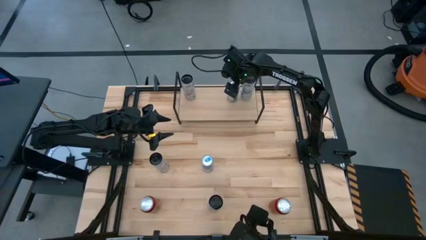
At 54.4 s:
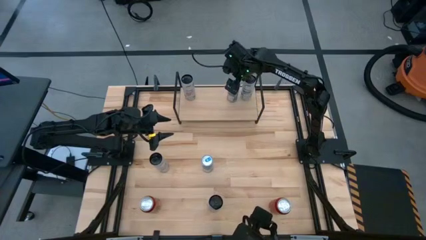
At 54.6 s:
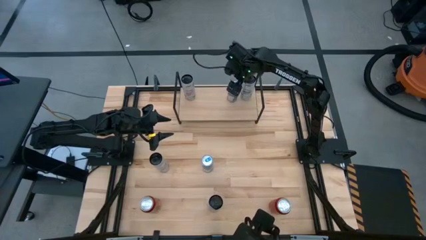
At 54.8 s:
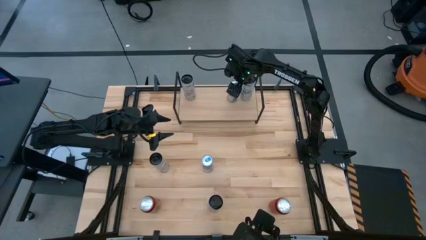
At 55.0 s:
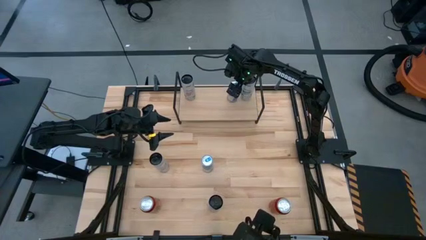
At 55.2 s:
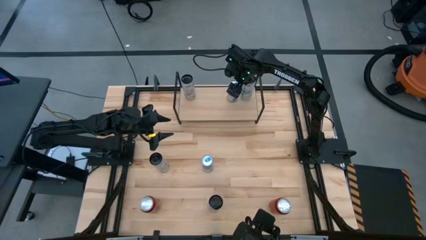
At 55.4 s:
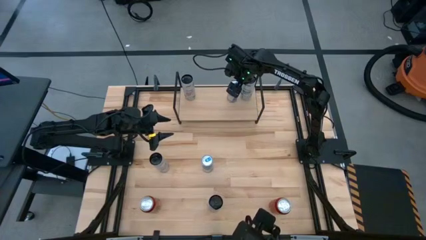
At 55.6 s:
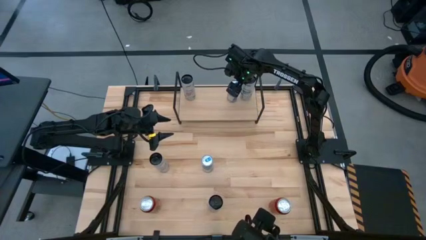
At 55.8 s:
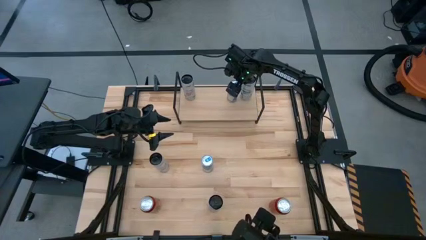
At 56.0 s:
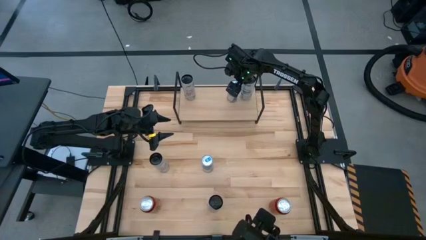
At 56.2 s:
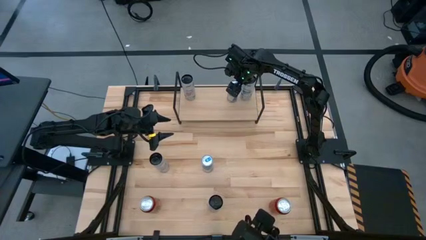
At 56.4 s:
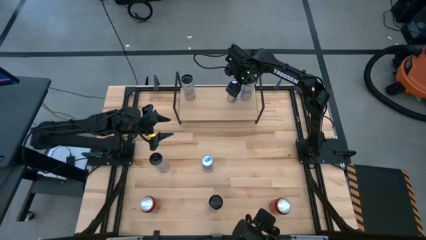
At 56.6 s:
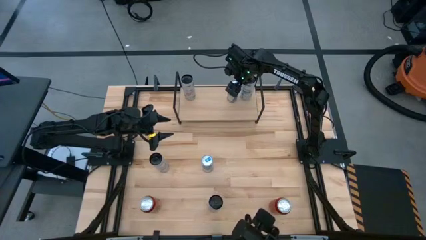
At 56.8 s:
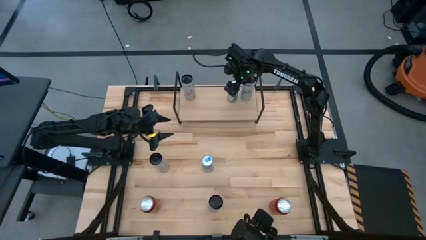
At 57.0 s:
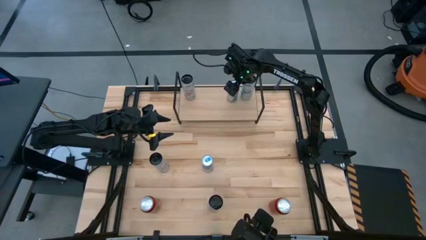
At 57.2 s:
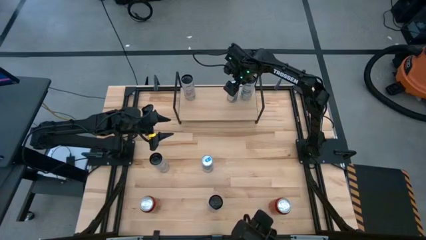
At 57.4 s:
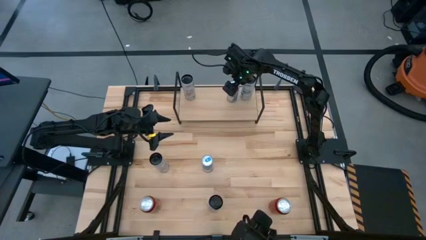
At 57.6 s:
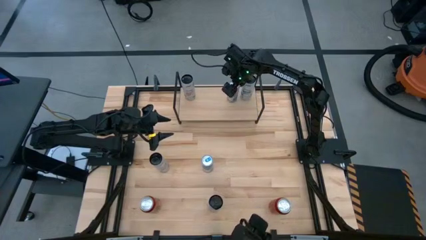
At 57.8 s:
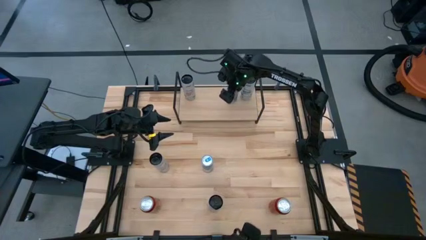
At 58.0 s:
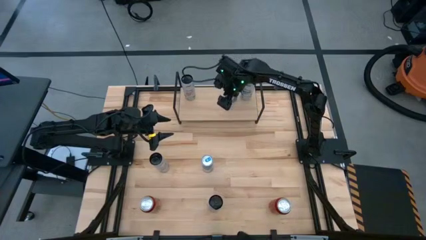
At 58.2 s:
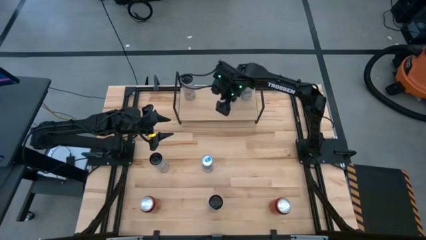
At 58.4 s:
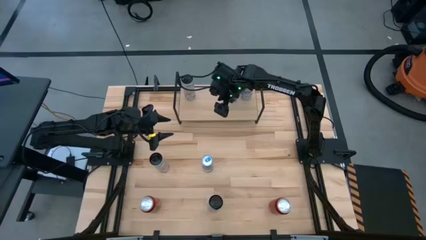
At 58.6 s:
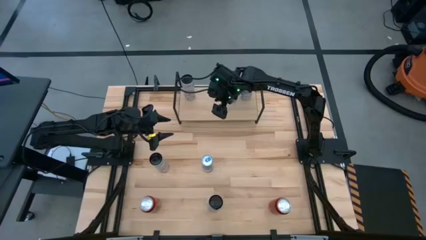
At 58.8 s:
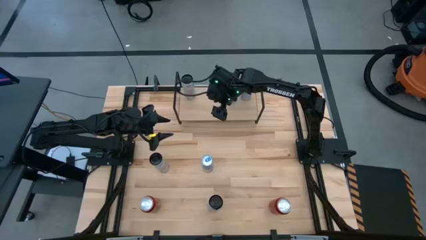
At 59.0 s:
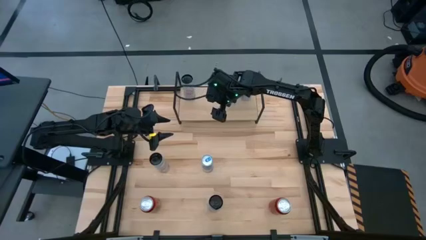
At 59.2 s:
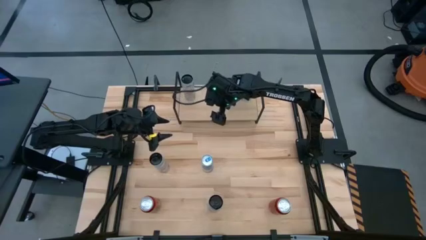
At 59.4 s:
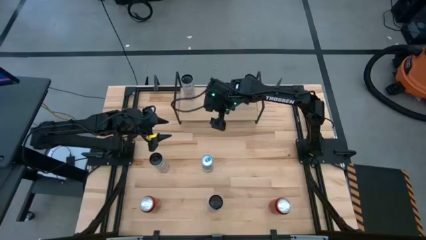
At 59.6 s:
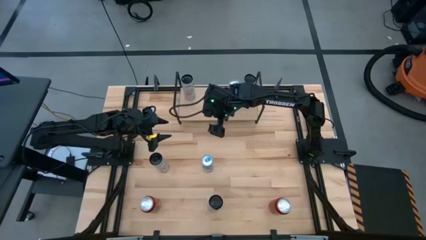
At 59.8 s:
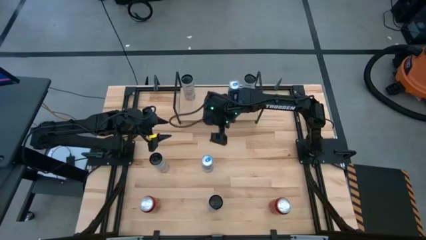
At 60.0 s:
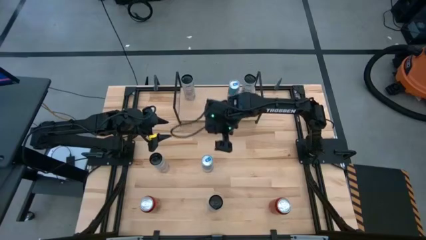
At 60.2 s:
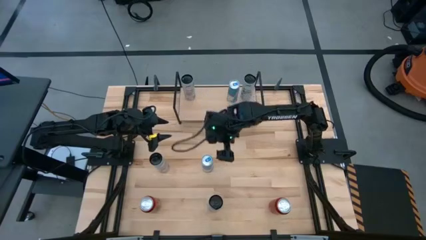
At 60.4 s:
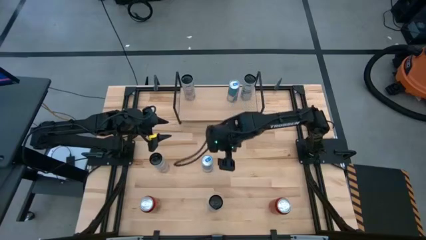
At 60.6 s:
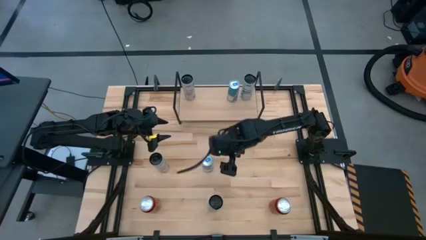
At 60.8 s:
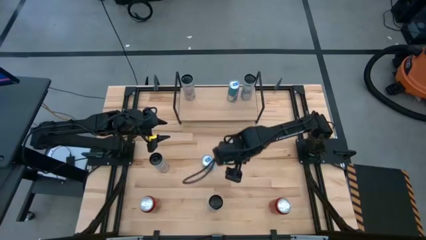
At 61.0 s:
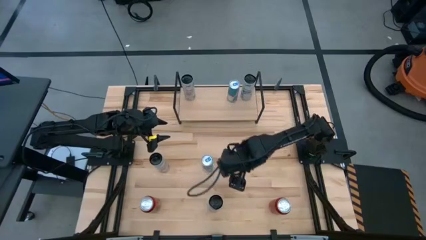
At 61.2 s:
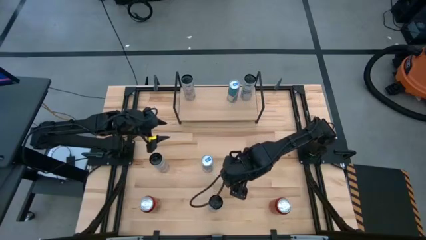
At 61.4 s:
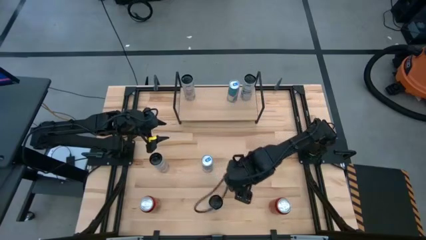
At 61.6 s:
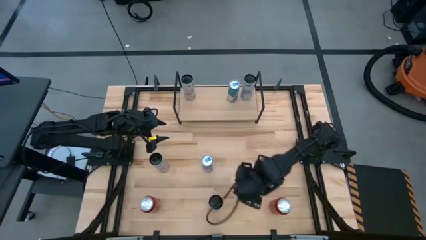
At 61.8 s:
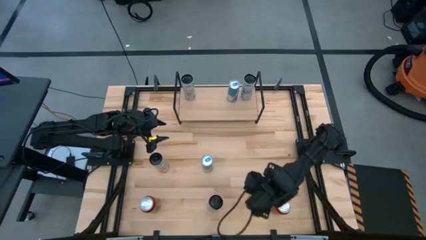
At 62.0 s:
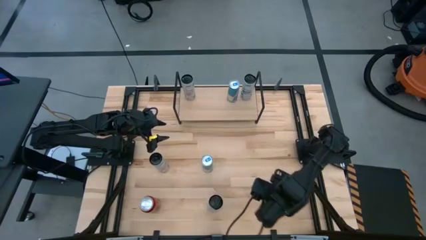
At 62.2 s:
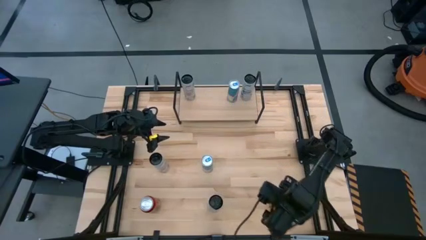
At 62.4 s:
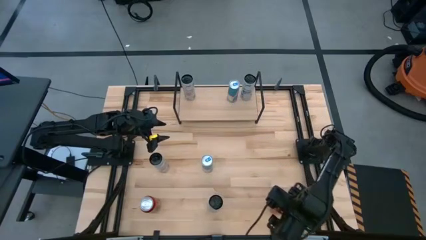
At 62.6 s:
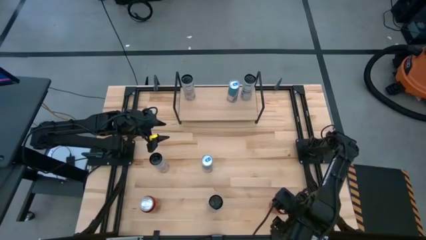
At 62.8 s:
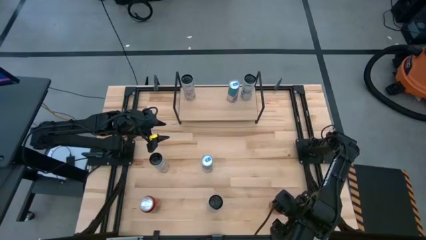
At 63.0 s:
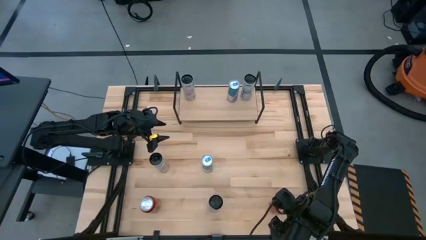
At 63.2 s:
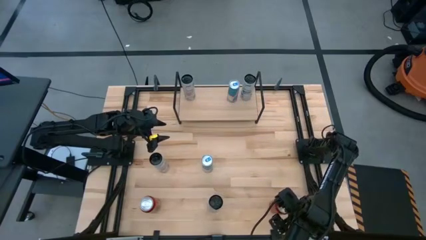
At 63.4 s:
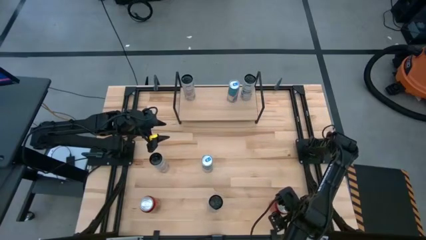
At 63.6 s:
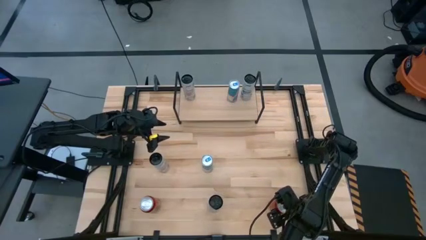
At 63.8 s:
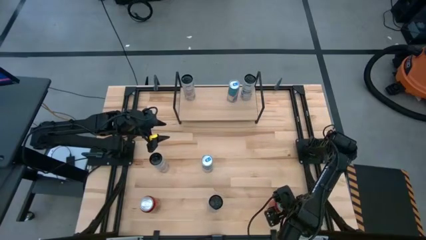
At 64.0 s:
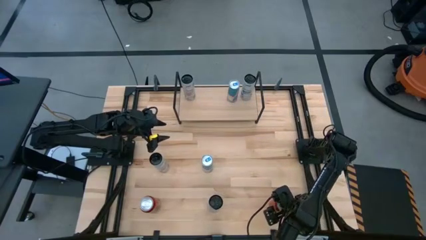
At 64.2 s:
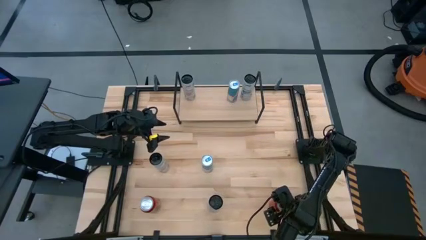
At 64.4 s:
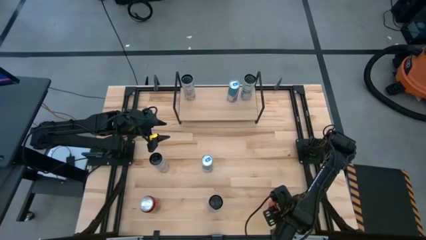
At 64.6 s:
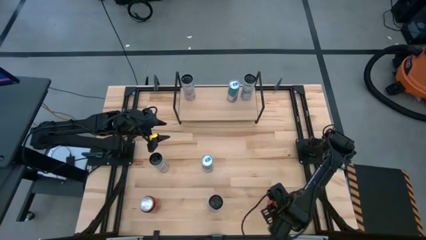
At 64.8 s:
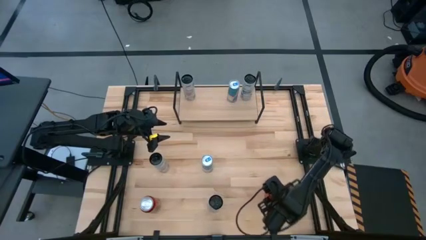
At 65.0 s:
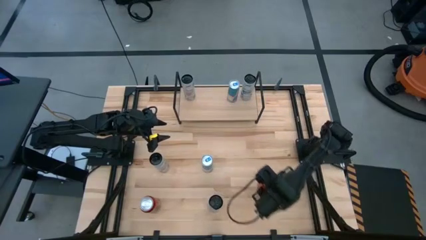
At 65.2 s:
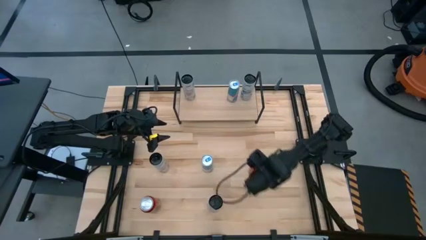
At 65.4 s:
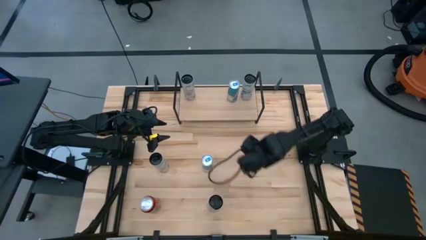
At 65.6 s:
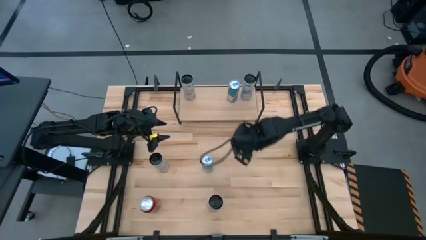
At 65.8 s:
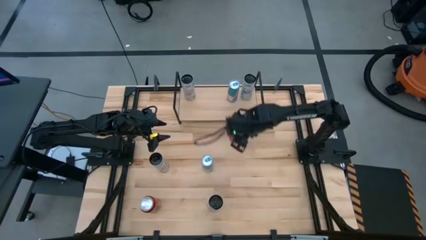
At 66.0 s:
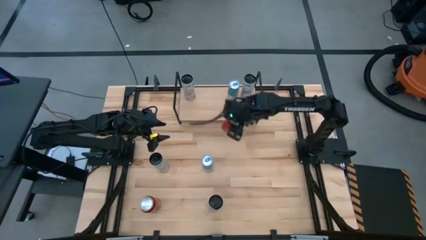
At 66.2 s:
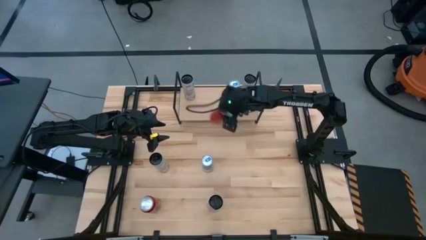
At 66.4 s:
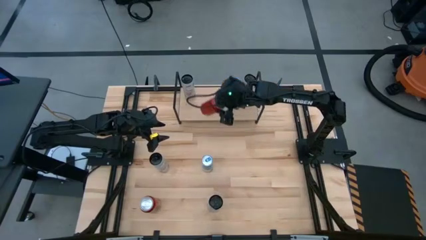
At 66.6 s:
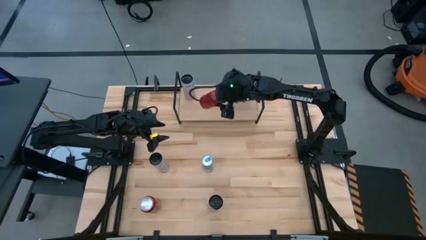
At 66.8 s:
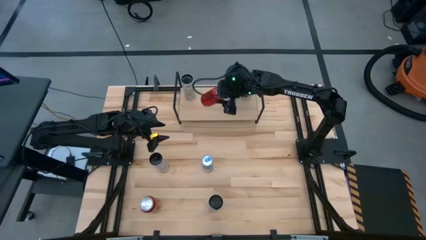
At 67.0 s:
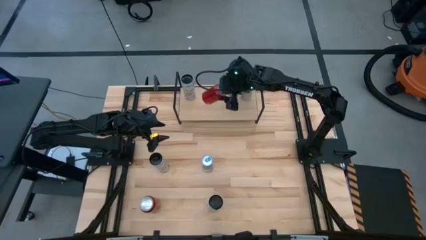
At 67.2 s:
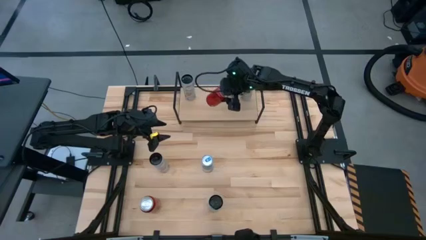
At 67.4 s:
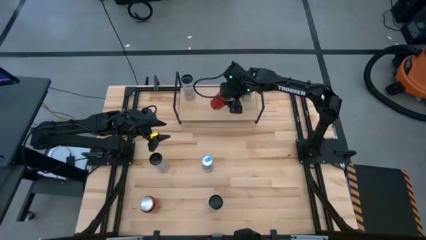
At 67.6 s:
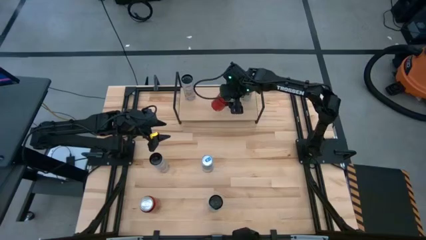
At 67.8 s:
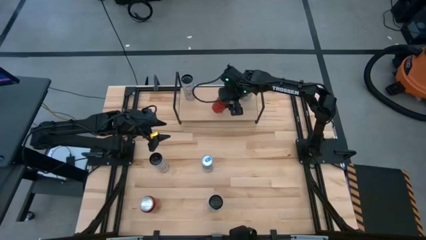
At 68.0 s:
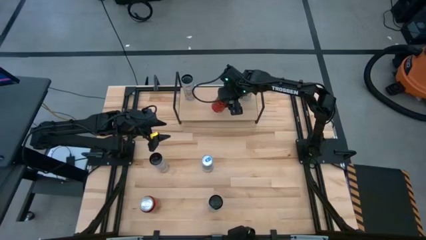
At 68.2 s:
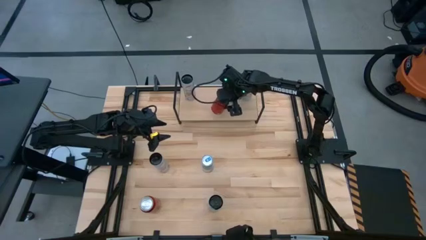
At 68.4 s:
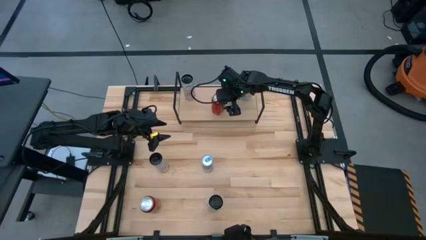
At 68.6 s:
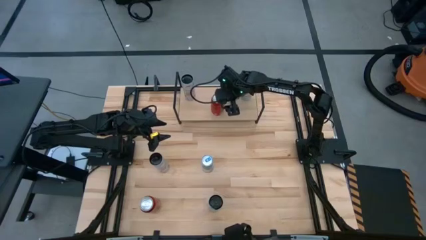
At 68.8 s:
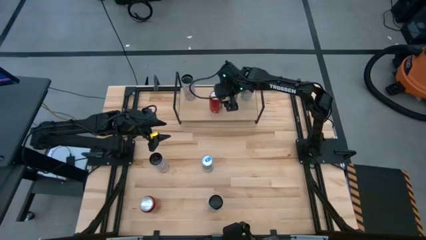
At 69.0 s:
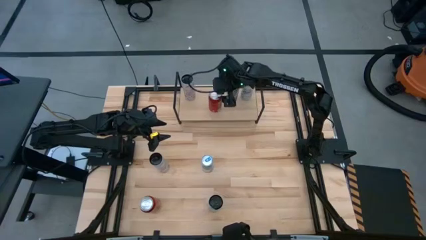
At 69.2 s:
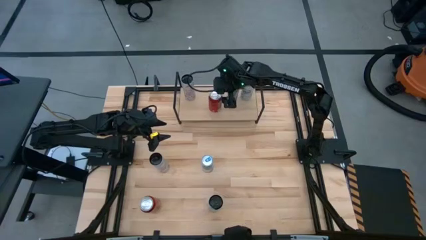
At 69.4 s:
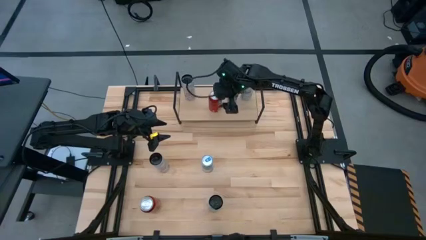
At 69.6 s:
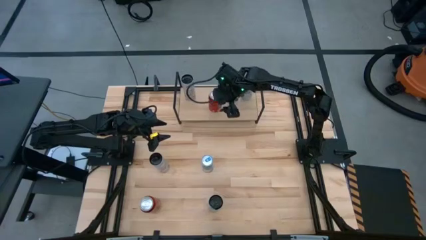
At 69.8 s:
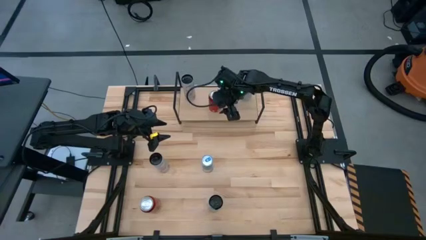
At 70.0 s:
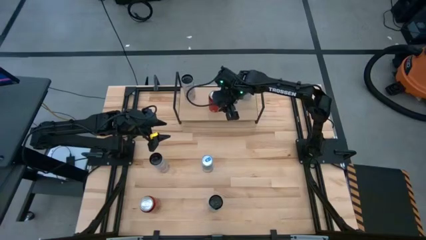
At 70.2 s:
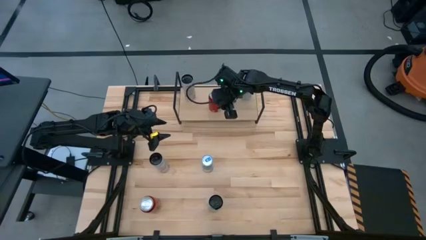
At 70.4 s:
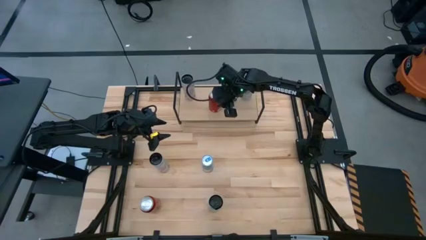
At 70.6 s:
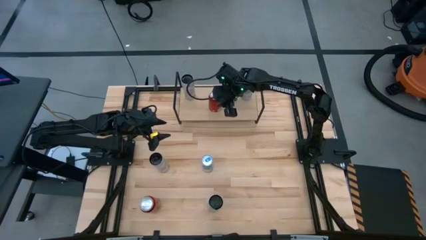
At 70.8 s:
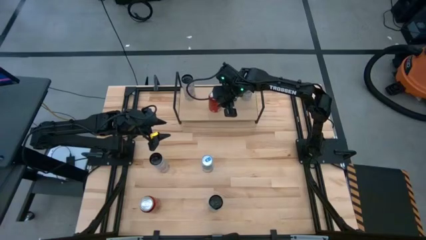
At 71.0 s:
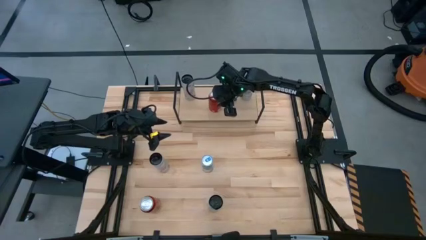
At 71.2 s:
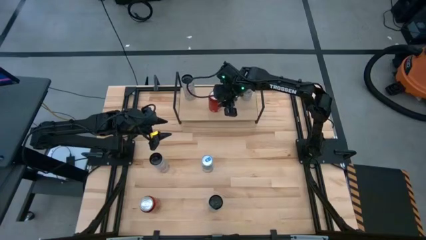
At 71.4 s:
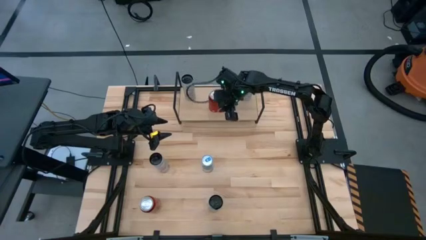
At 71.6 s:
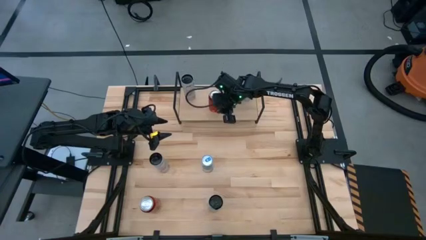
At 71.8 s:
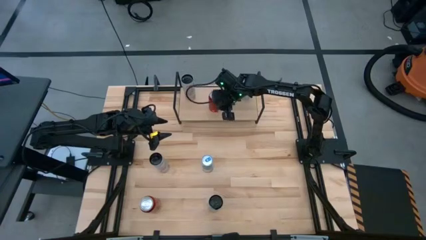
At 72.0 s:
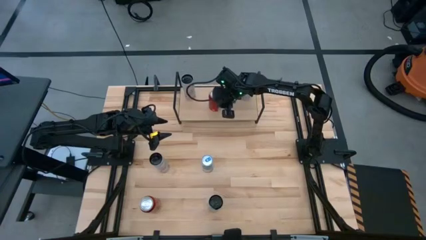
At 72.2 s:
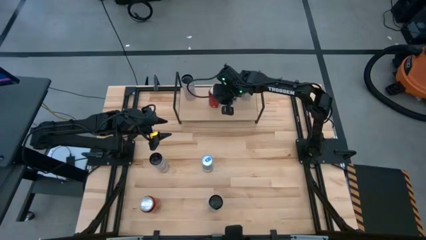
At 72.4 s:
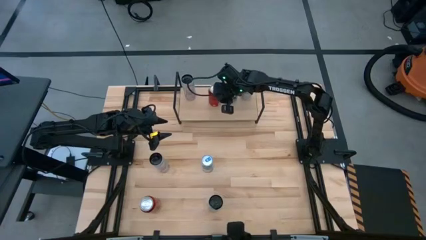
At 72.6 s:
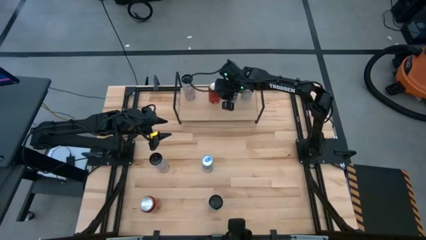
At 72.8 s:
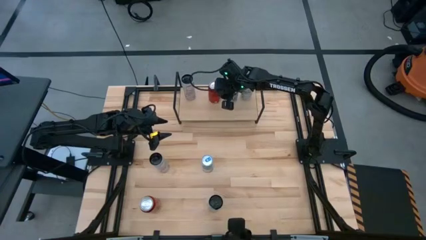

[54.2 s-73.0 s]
Task: Place canned beverage on shelf
Put the right red soda can on the shelf
